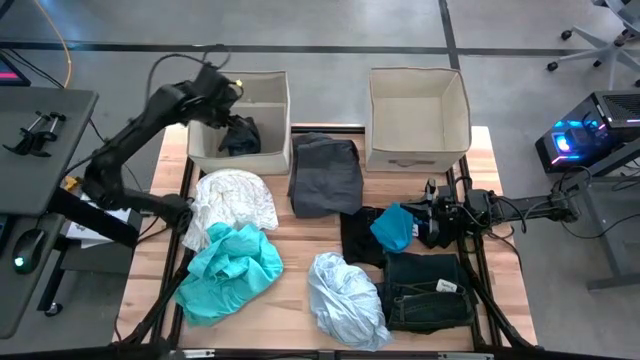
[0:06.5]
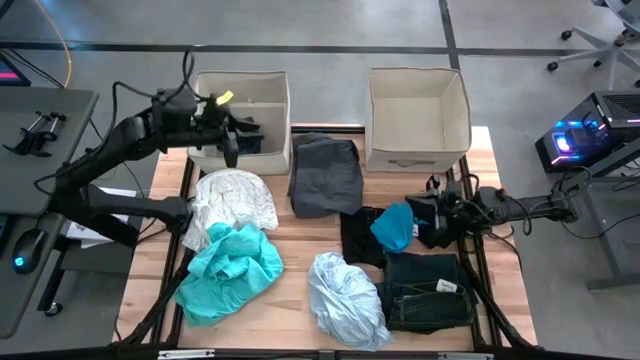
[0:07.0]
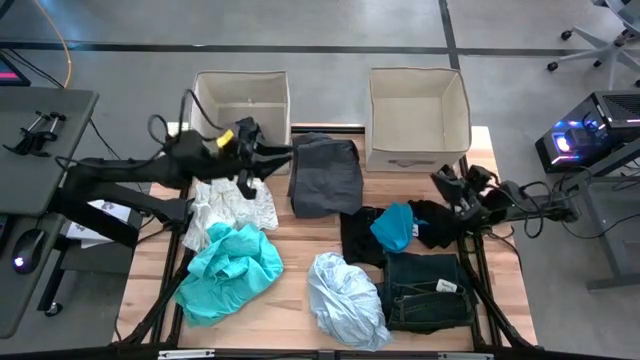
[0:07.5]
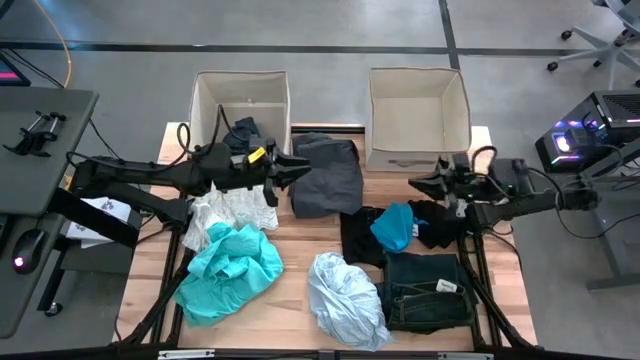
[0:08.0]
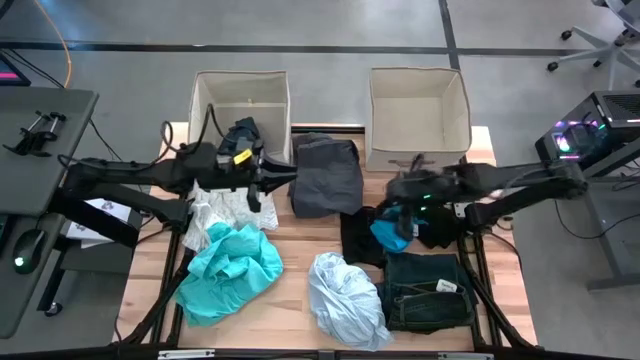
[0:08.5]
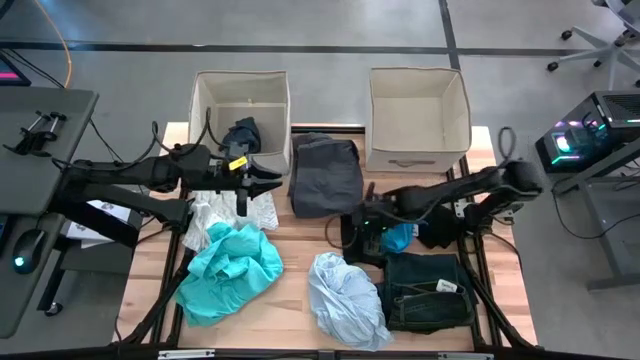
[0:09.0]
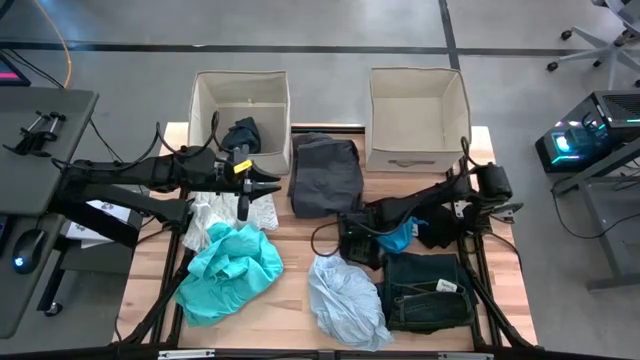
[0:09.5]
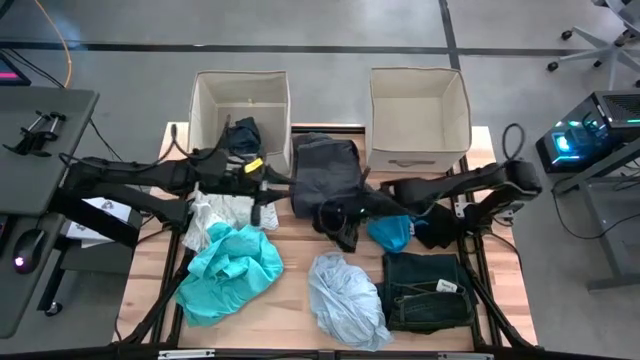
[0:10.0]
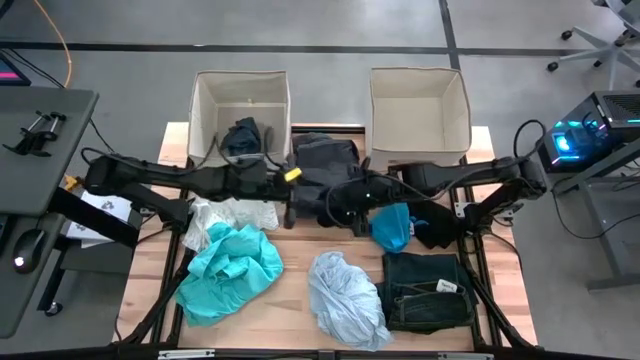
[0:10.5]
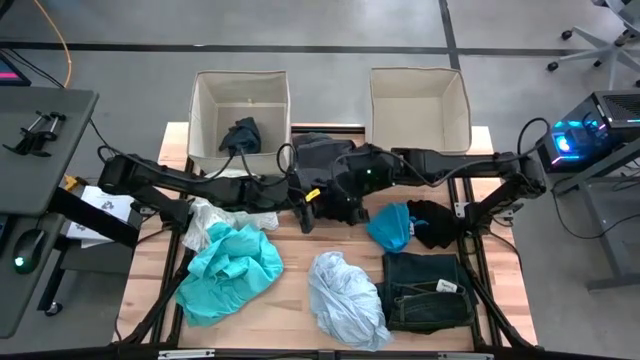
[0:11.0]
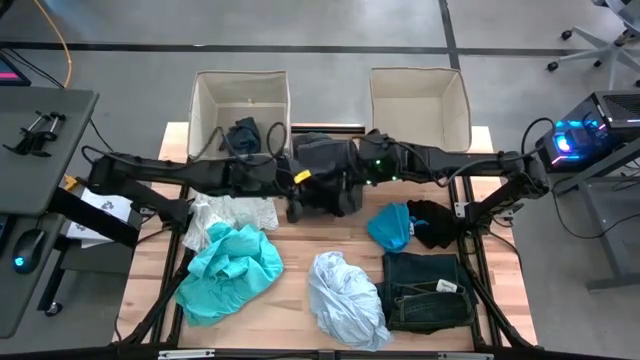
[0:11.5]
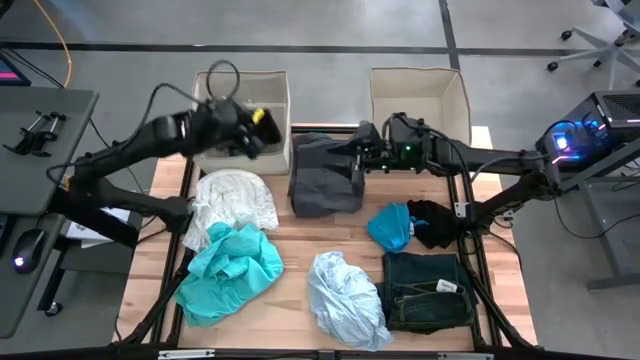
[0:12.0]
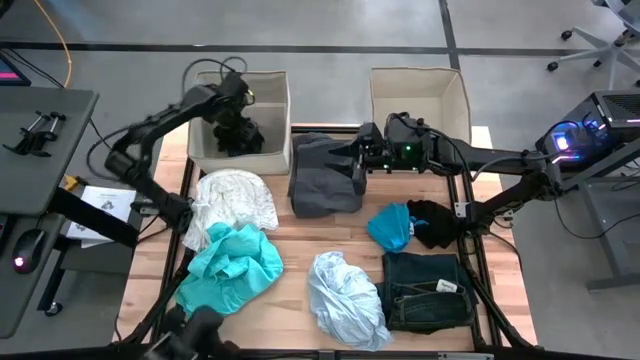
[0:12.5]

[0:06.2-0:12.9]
Task: Sort clothes
Put the left black underwear into the left laundry organizer

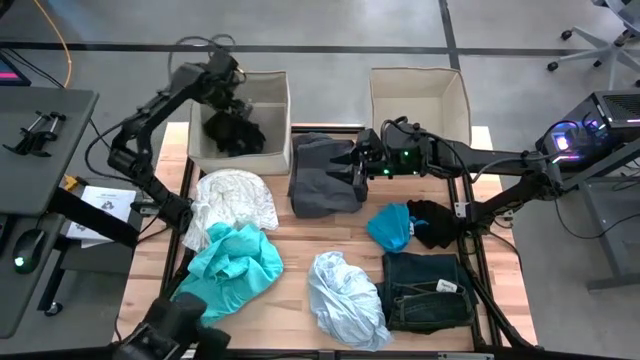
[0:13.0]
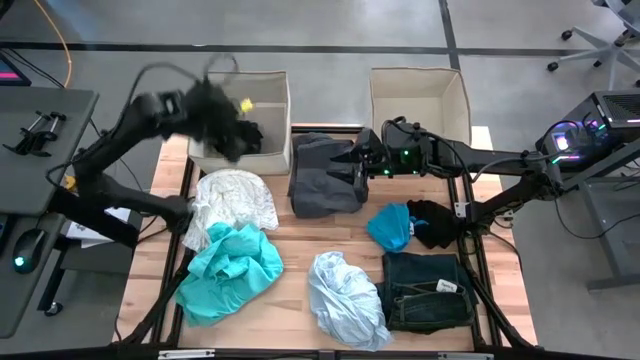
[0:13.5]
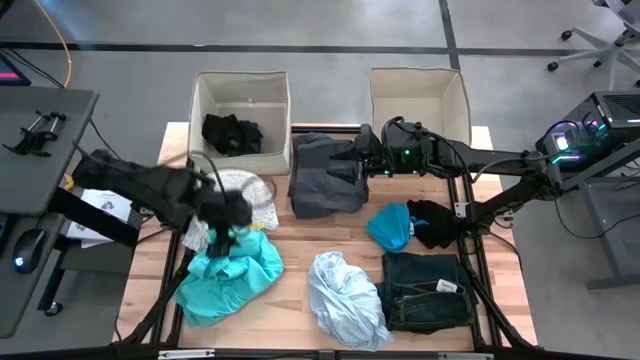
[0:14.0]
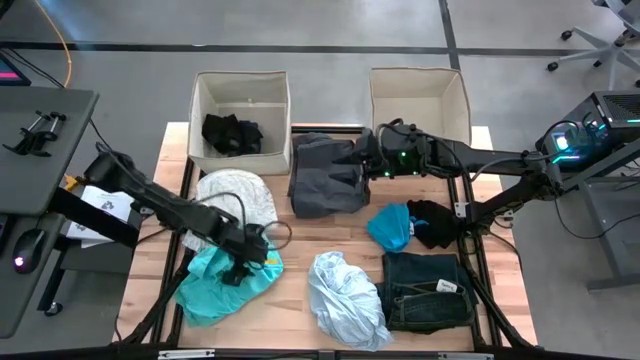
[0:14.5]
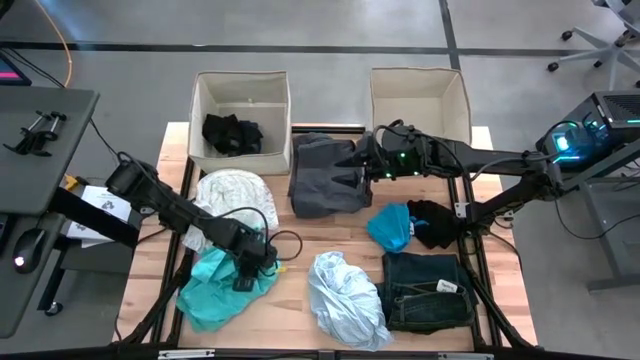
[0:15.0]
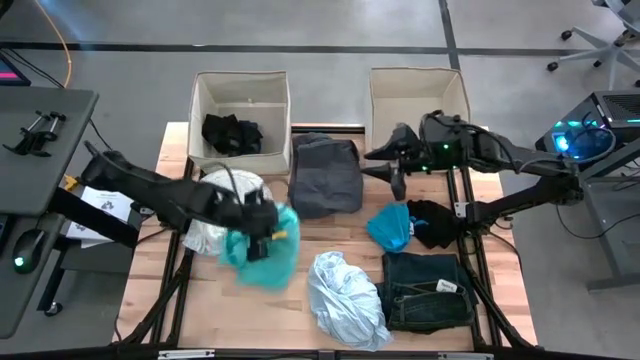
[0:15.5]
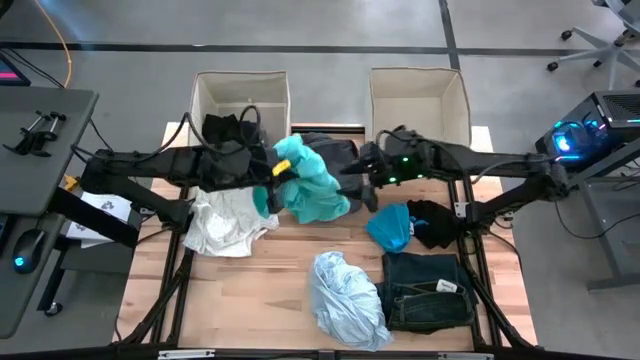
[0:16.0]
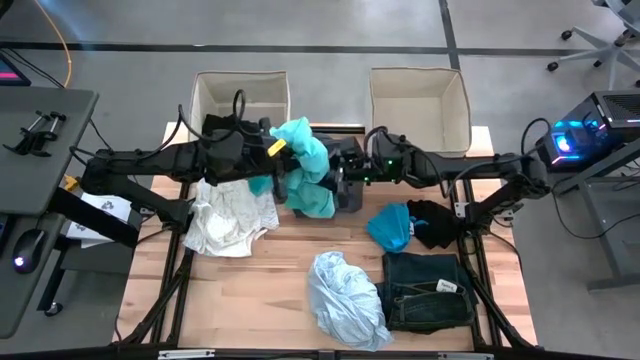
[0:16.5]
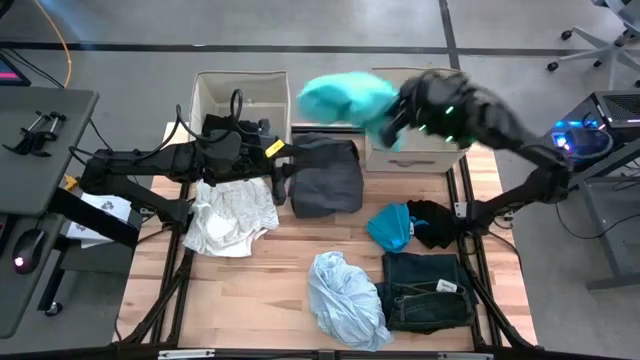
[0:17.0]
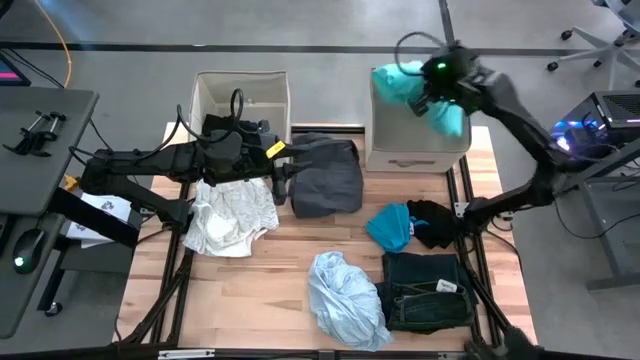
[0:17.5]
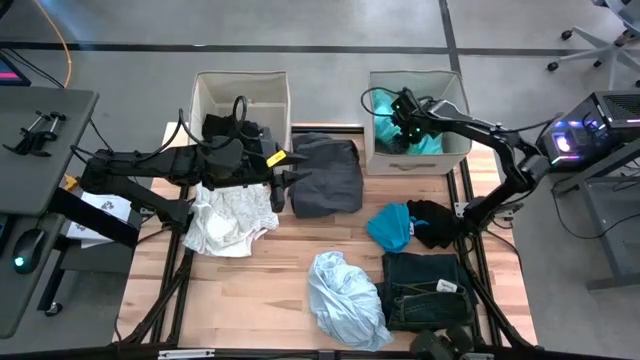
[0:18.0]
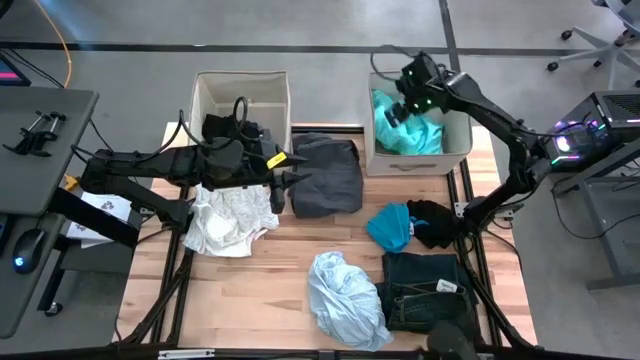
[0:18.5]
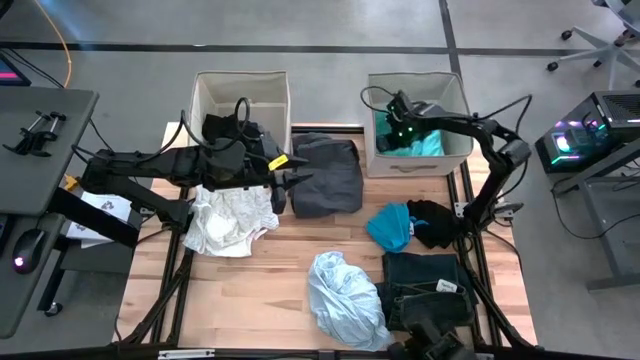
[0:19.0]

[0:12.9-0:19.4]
Put the light blue shorts into the right laundry organizer

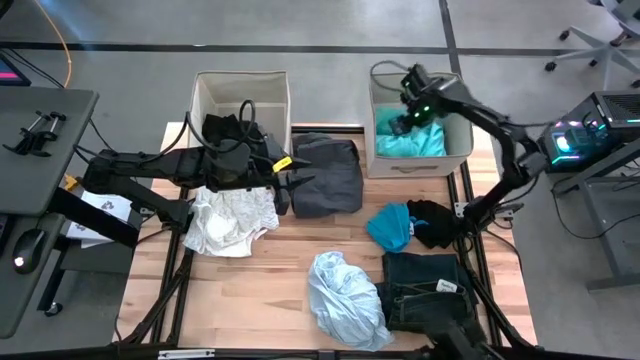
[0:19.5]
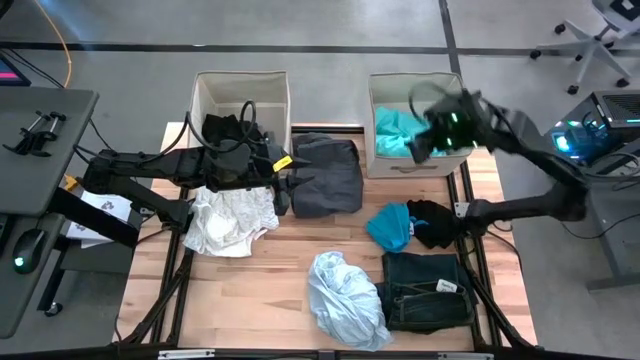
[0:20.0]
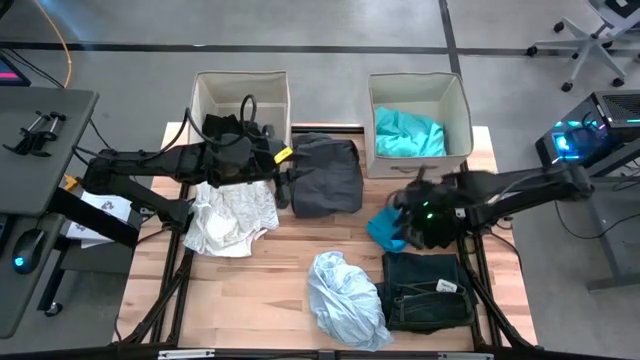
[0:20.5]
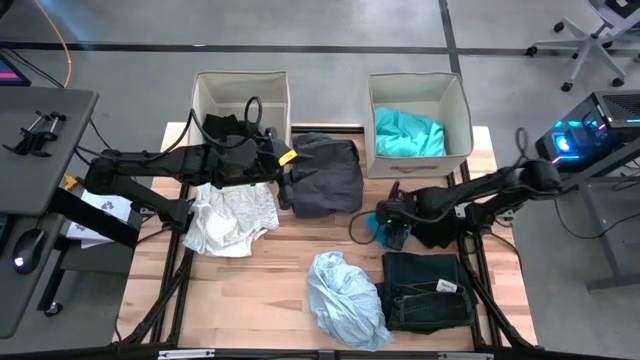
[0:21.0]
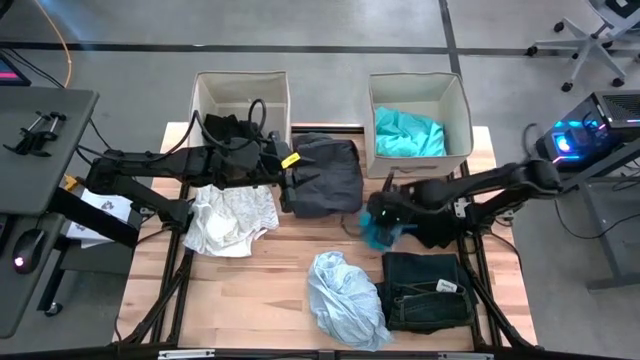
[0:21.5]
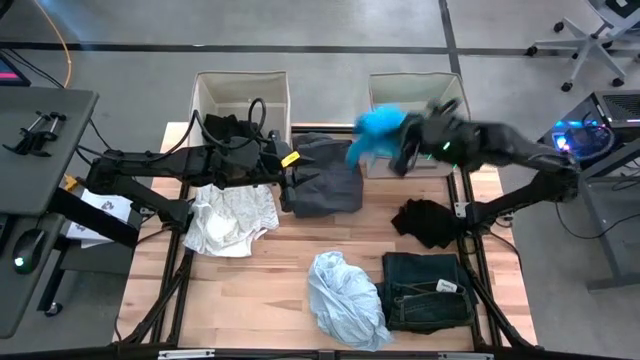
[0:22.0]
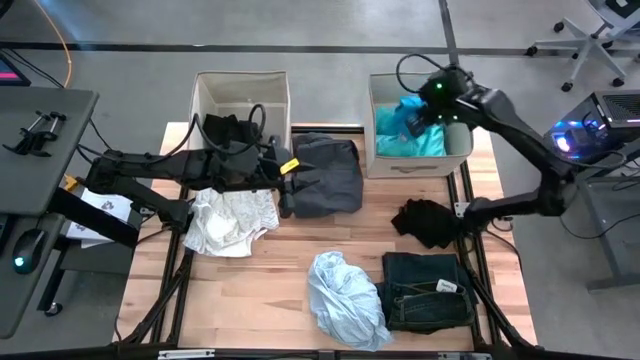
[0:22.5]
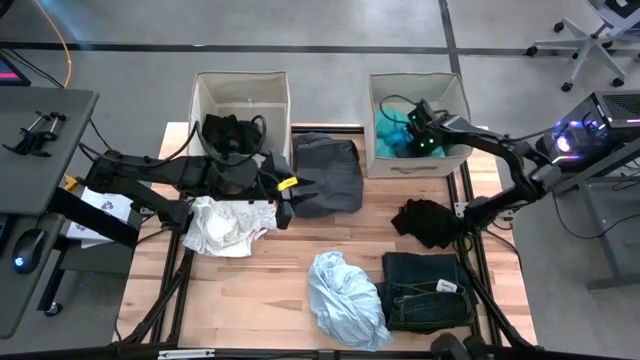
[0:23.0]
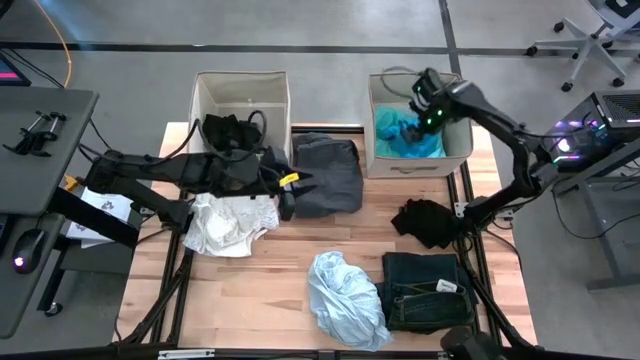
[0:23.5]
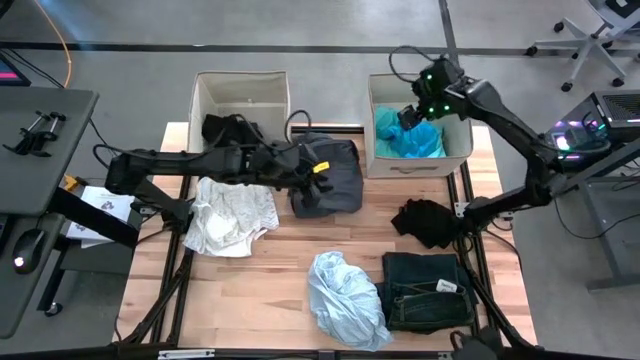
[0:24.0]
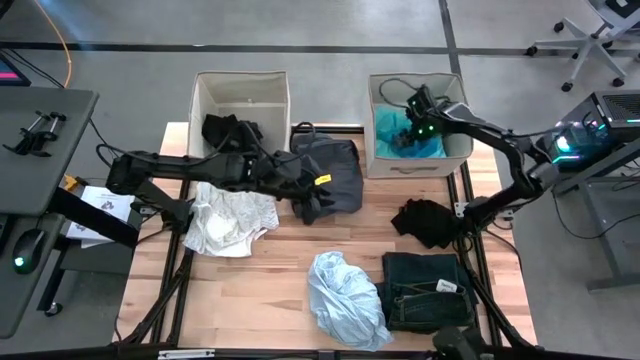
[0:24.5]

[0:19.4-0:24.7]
Put the blue shorts into the right laundry organizer

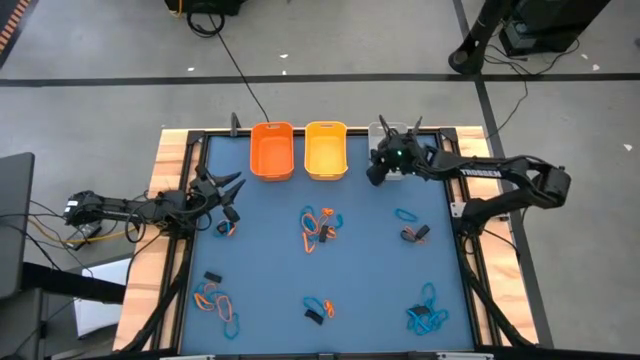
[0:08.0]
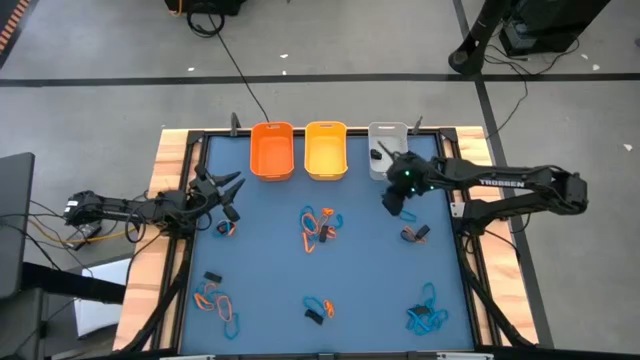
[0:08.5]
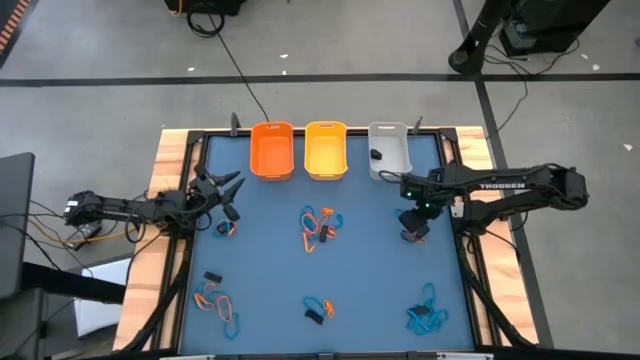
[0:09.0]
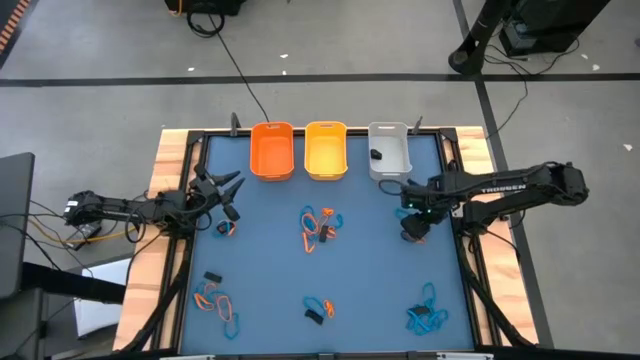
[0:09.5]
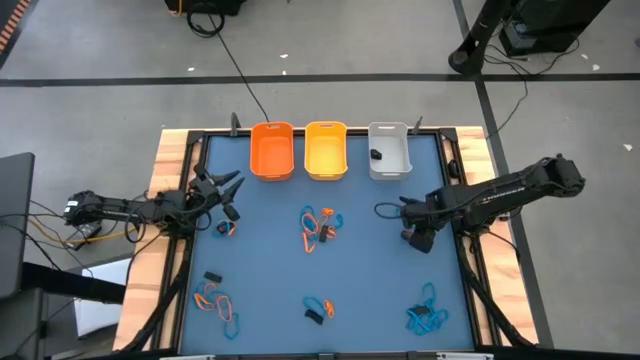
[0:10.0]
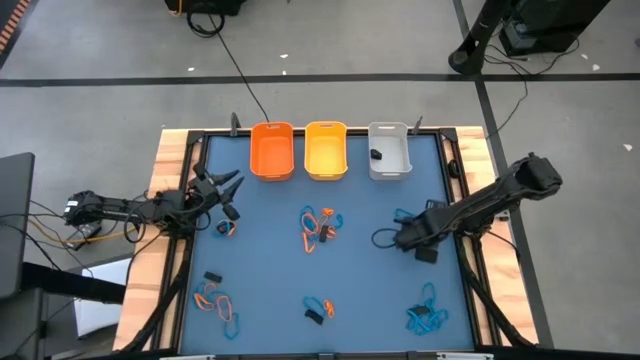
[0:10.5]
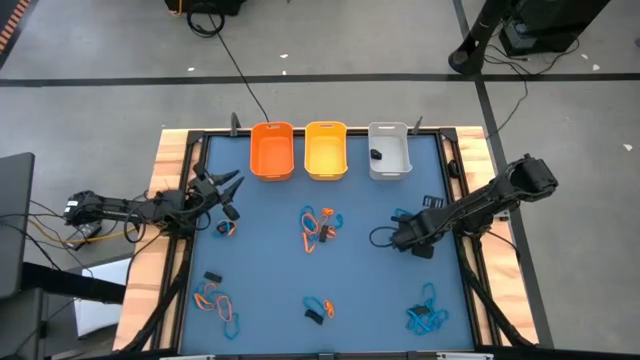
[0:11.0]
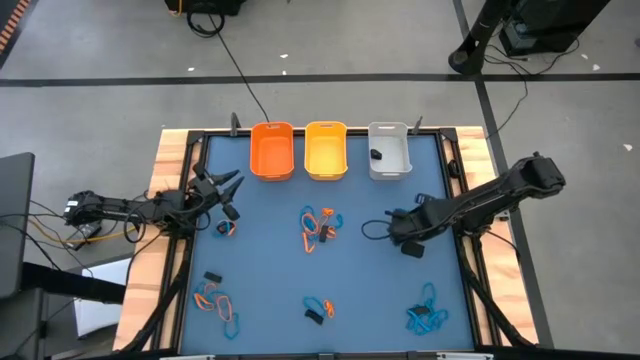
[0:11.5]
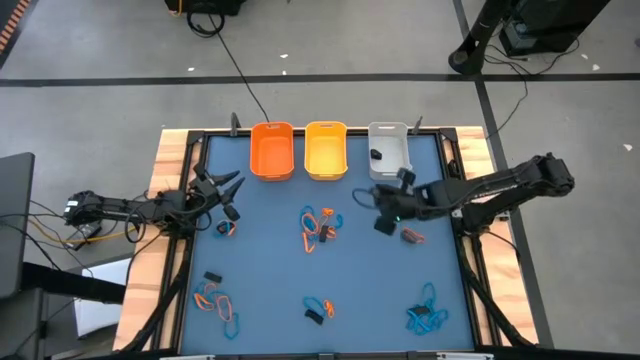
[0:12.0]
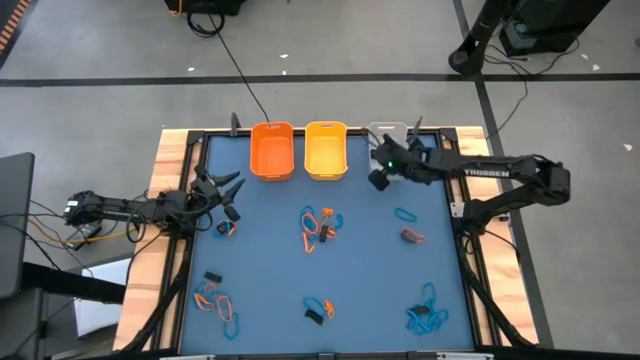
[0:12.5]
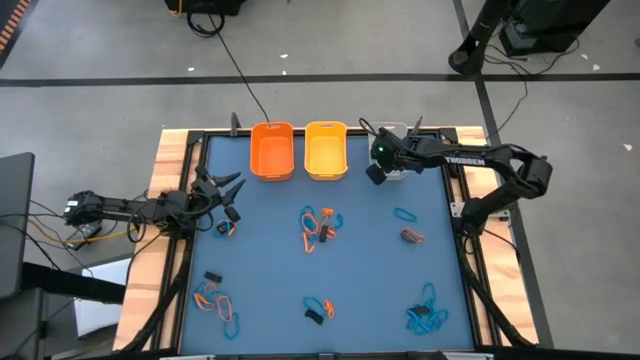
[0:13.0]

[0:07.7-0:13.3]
Task: Sort rubber bands into baskets
Put the black rubber band into the gray bin
